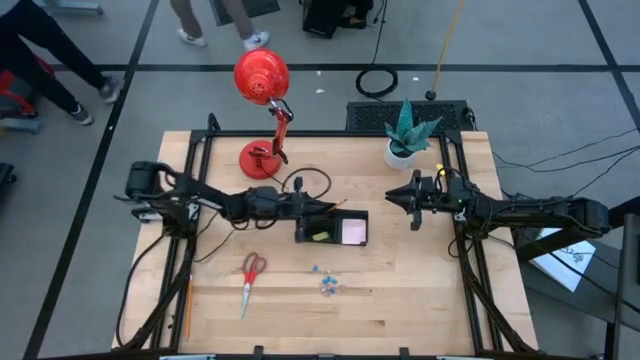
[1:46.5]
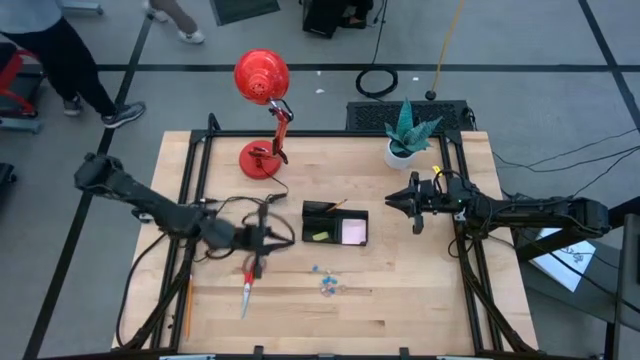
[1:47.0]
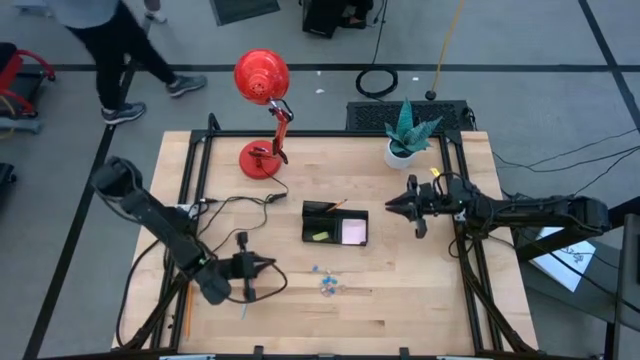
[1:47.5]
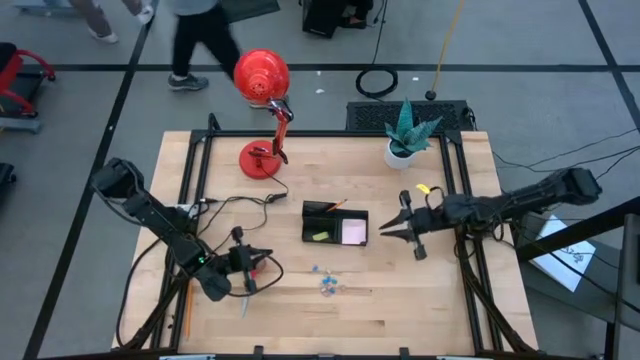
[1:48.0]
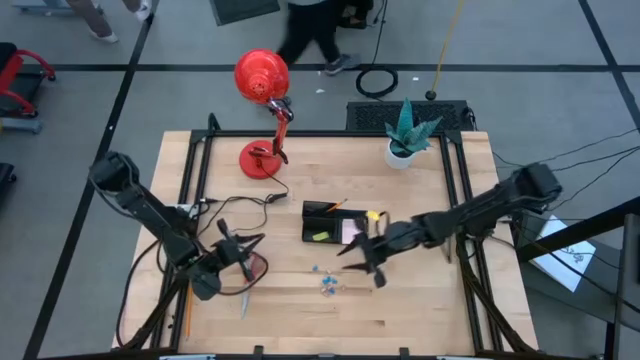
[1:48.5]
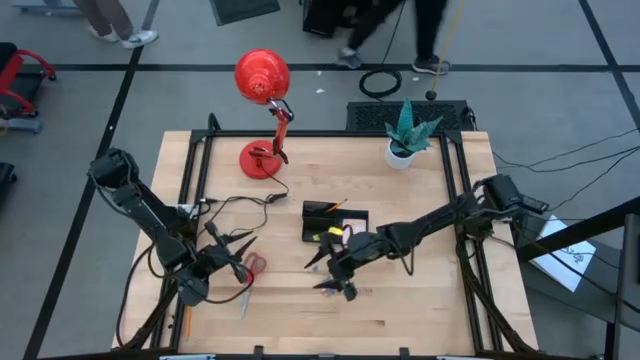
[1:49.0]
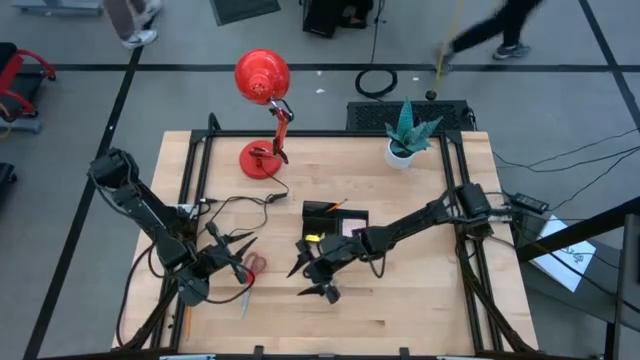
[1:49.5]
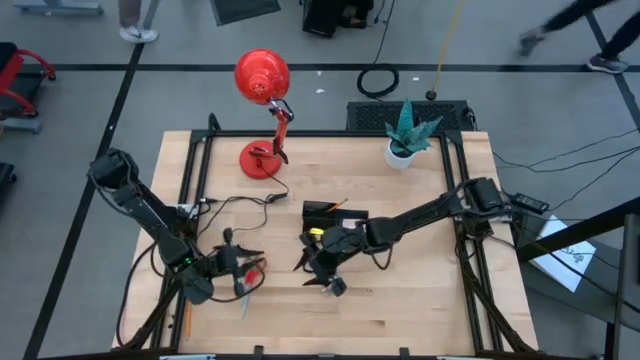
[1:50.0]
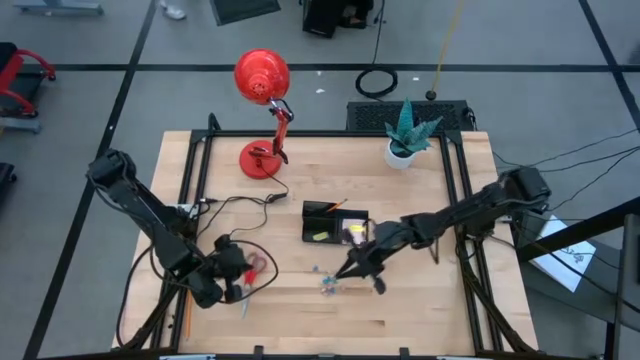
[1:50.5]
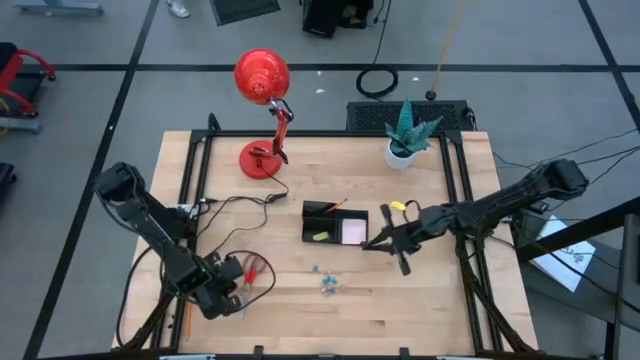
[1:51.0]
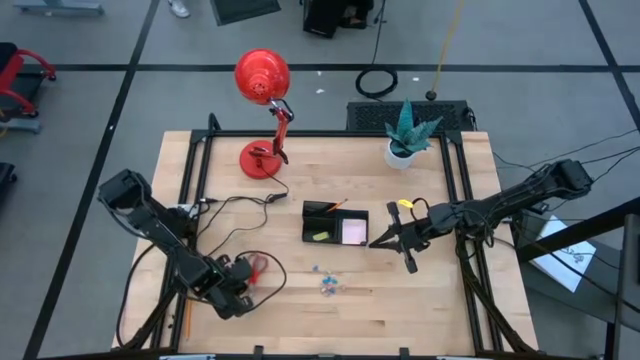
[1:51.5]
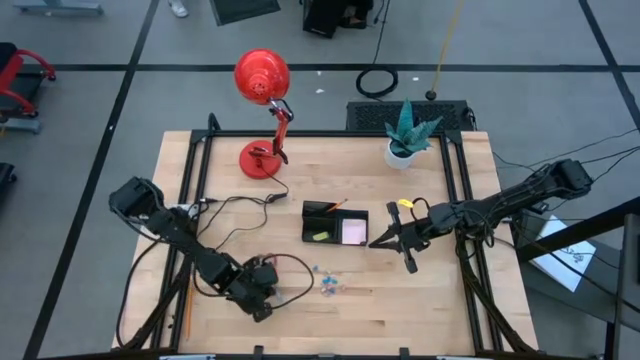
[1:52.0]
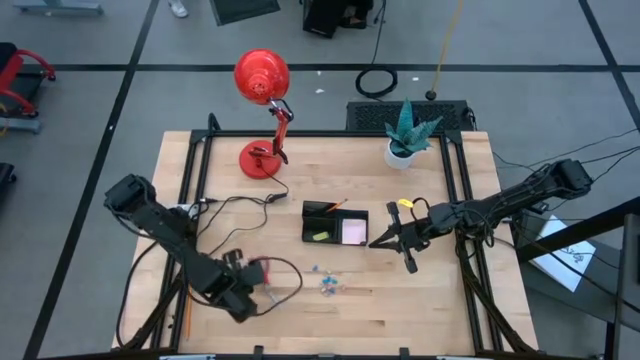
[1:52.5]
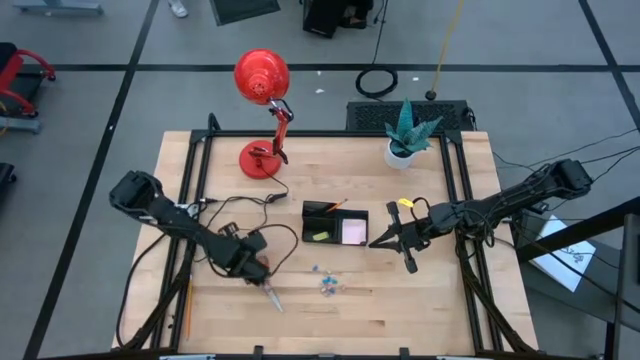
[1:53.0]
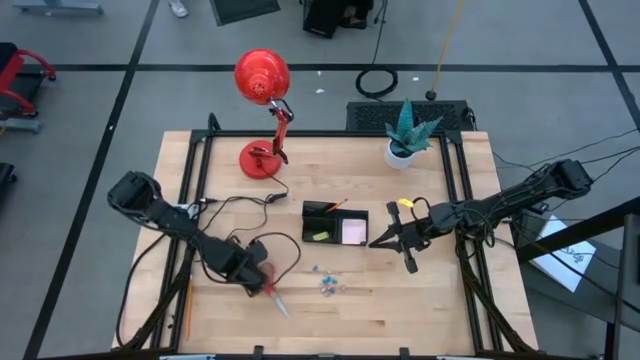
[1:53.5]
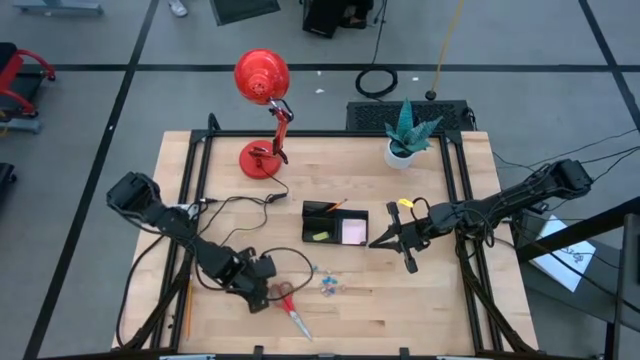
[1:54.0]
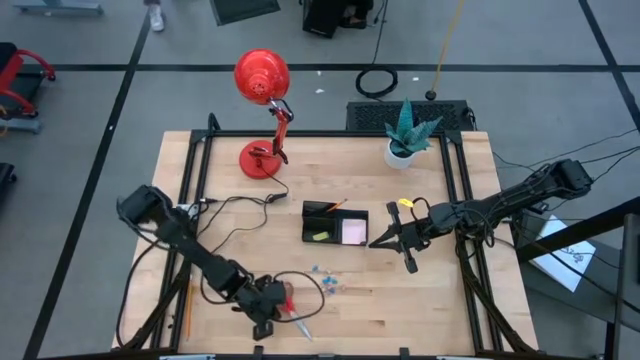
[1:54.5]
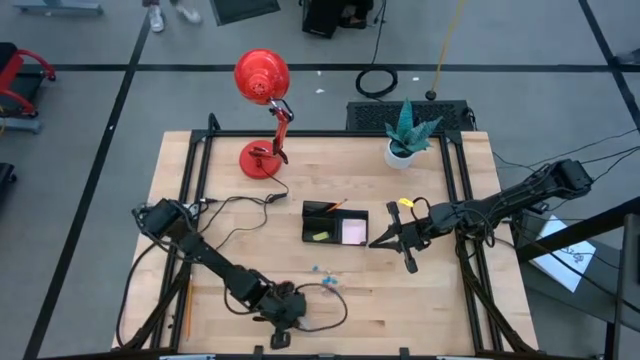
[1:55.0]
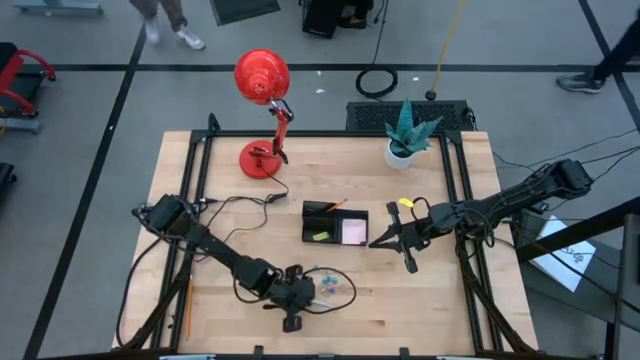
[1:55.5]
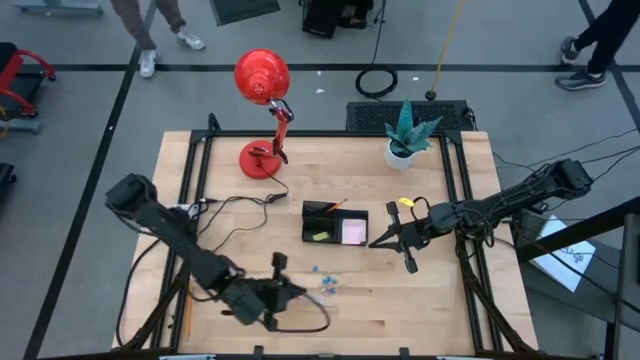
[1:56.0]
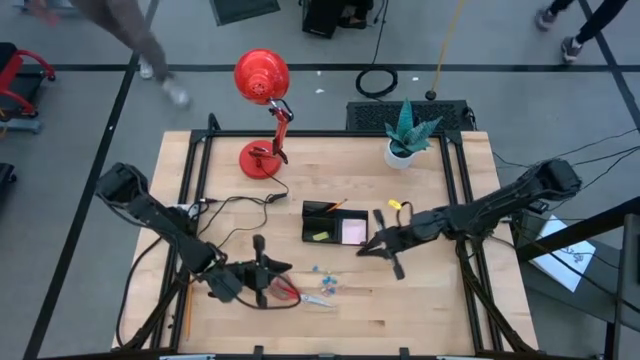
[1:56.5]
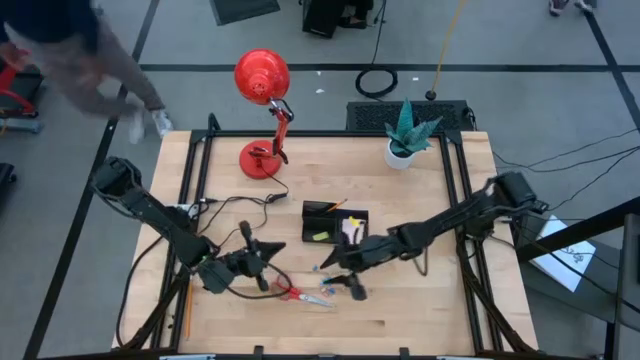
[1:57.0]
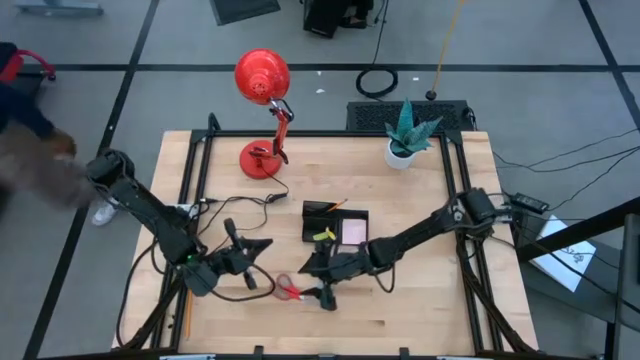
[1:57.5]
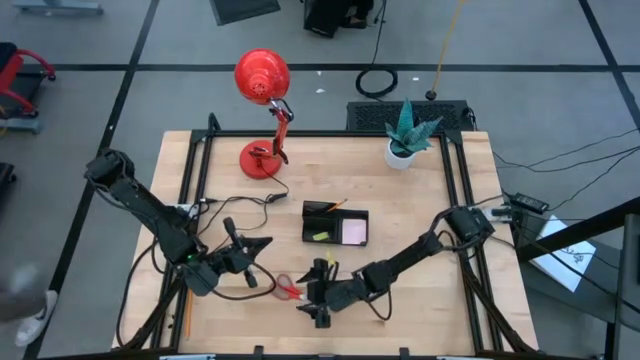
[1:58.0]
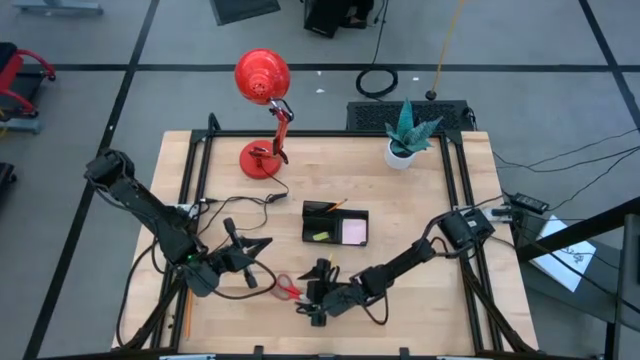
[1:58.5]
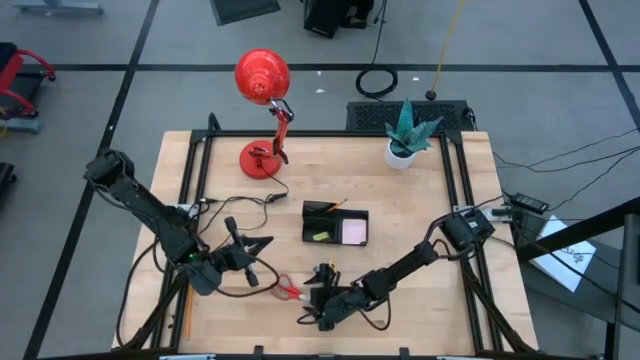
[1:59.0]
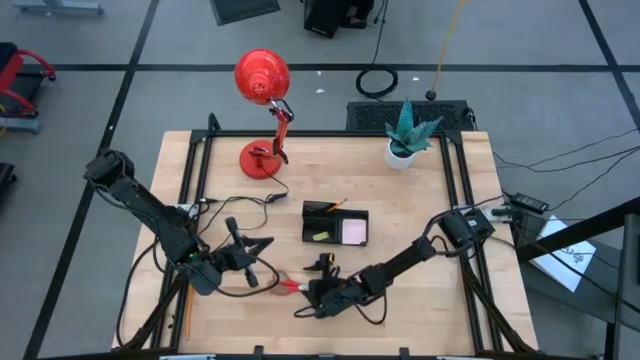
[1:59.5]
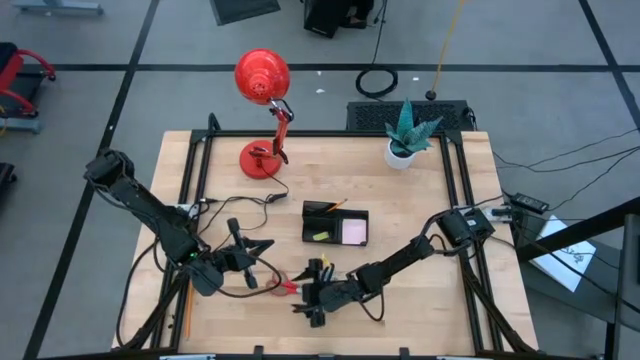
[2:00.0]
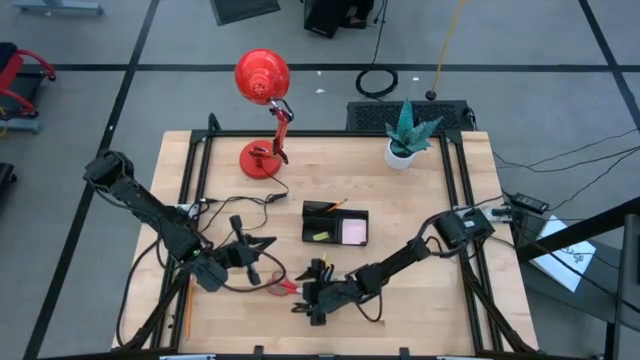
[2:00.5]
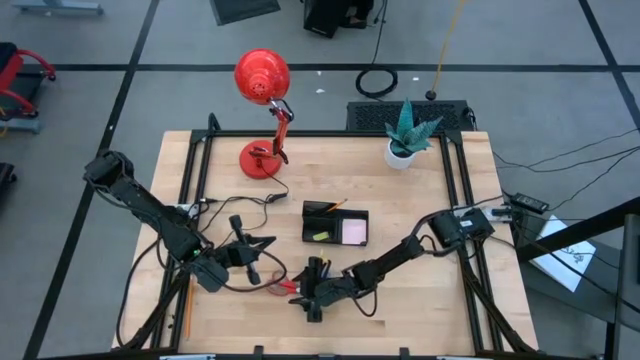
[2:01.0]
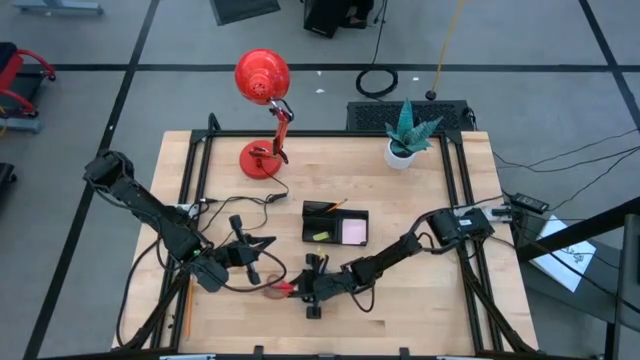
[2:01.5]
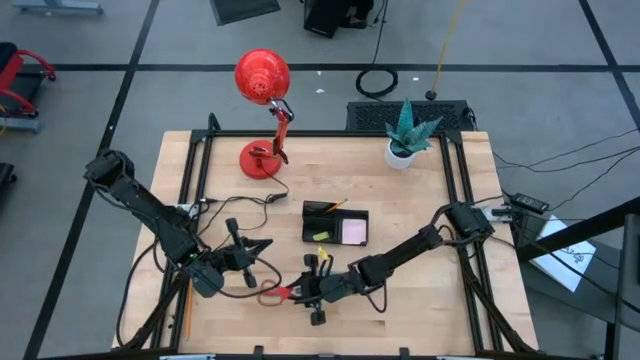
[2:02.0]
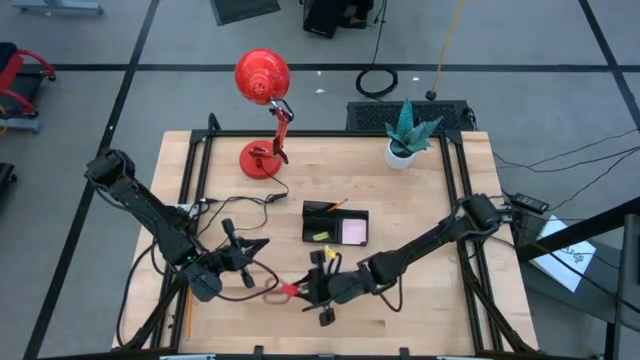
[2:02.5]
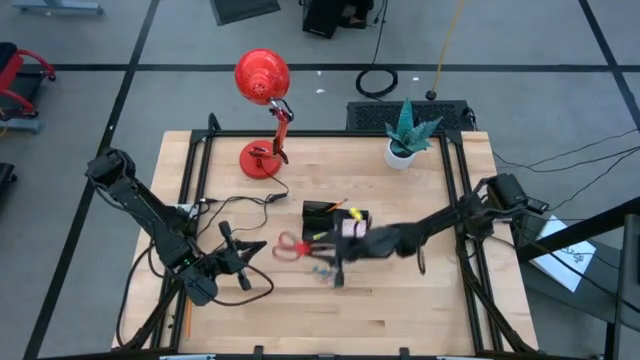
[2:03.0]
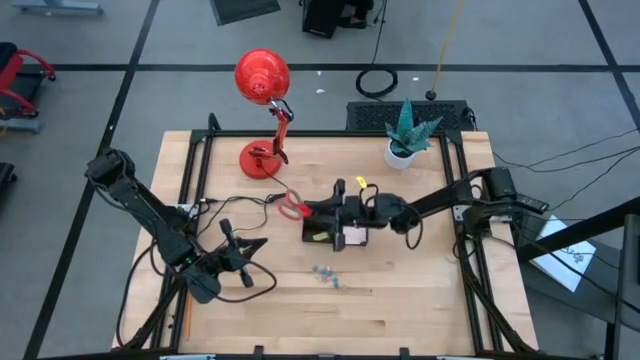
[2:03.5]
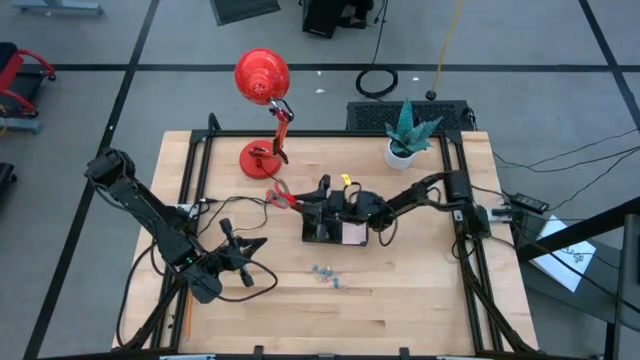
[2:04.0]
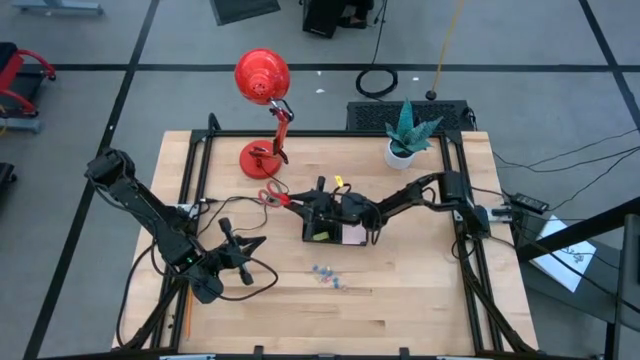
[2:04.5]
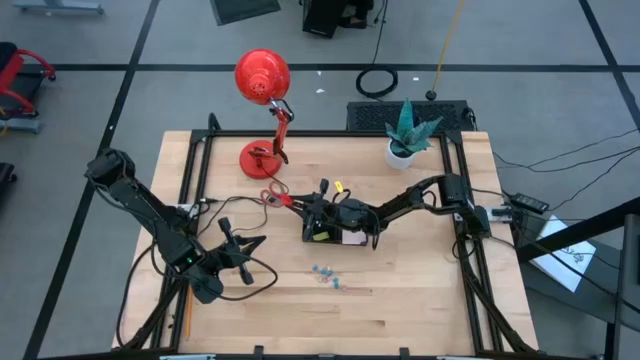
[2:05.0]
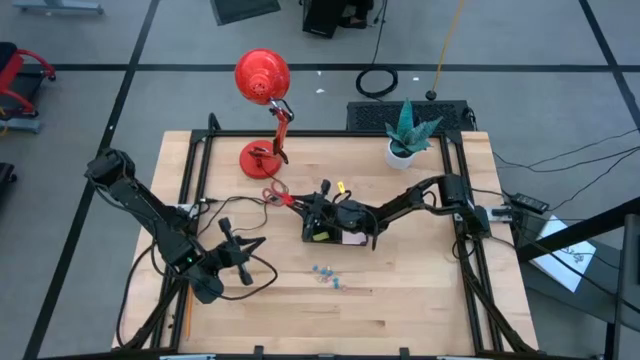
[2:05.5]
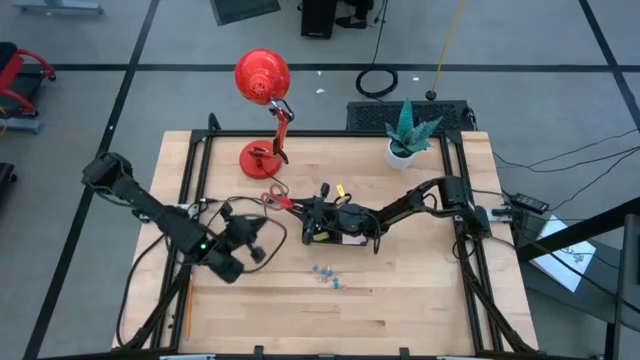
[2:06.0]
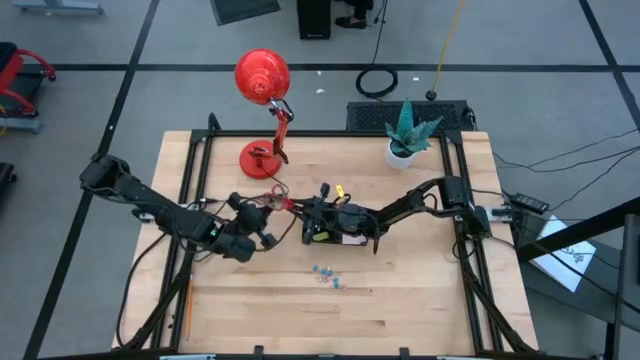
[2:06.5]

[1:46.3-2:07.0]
Task: Pick and place office supplies into organizer
Put the red scissors into the black desk organizer

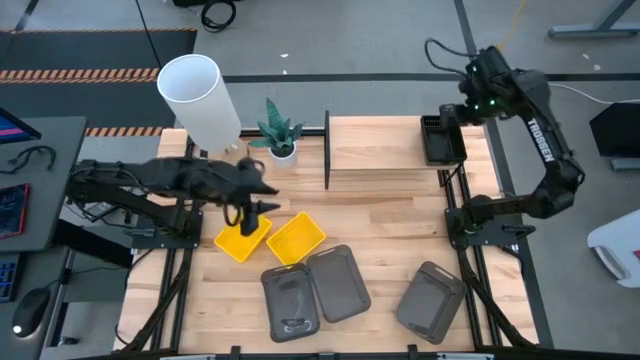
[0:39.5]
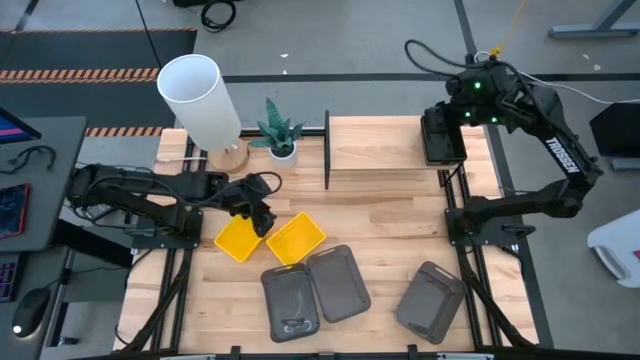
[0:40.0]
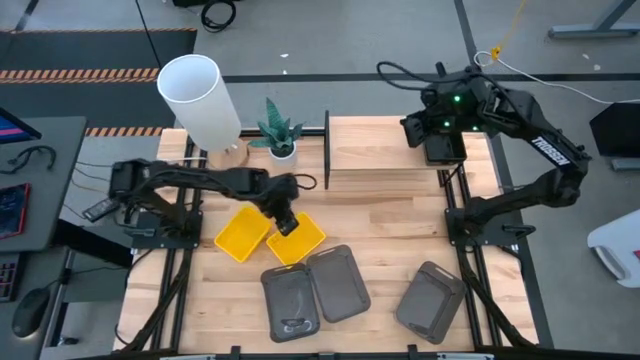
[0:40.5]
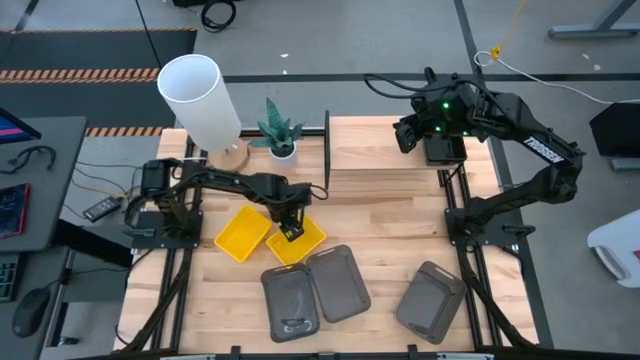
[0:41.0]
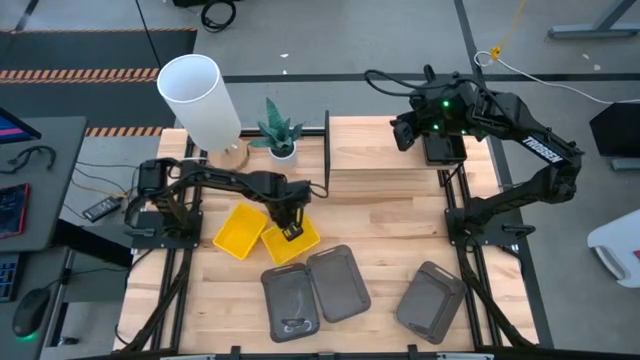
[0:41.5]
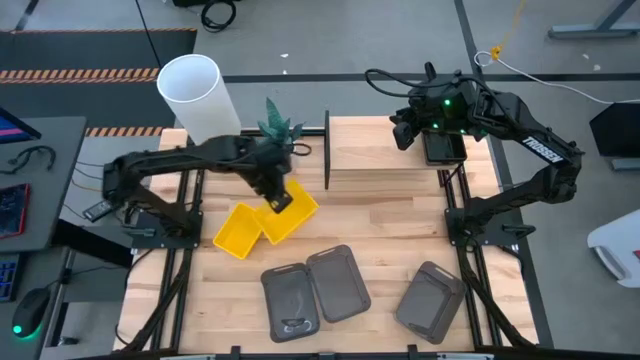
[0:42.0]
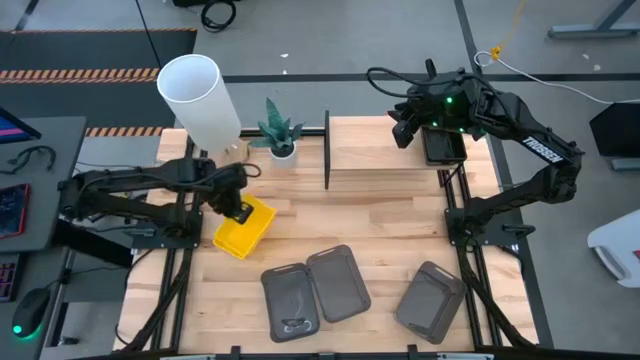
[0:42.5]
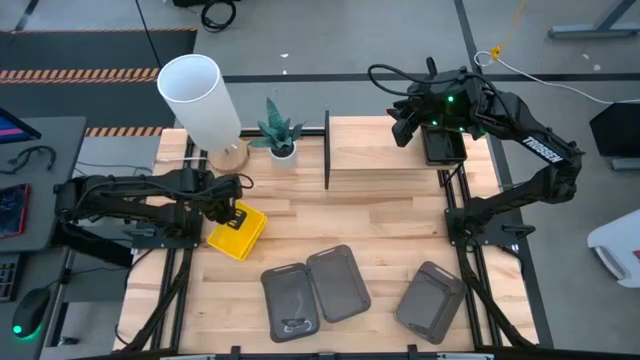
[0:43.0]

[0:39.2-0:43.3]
Task: Stack baskets on shelf by color
Stack the right yellow bin on top of the left yellow bin
